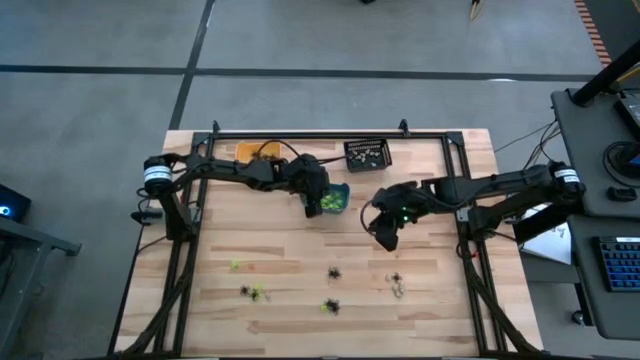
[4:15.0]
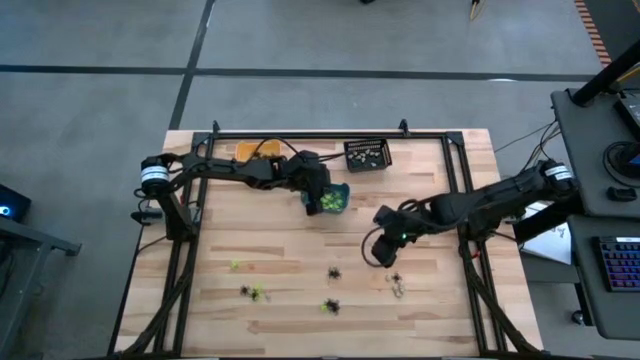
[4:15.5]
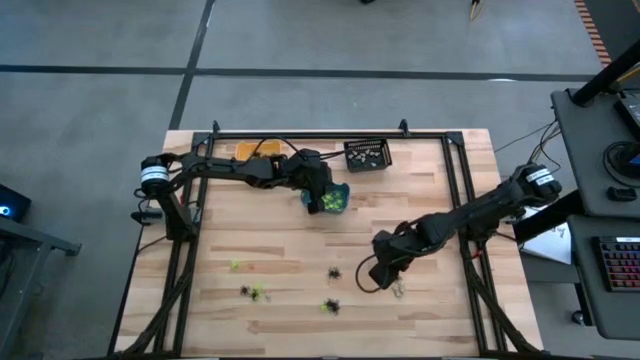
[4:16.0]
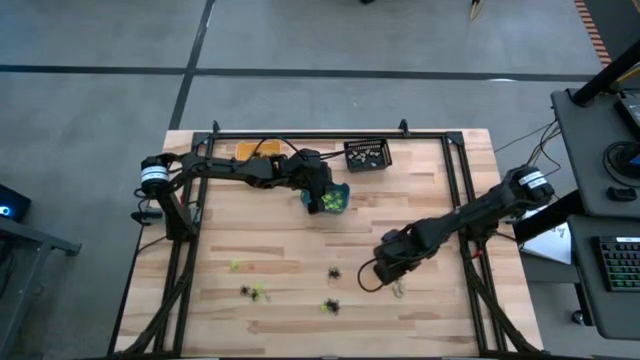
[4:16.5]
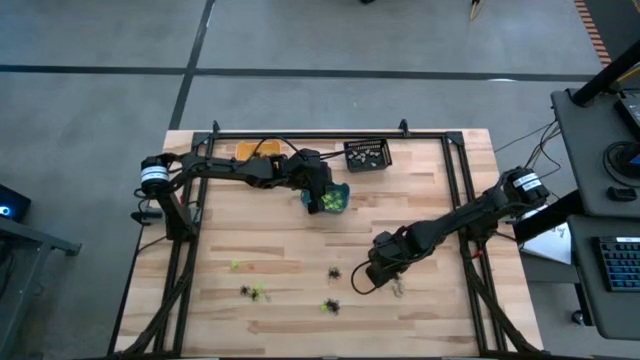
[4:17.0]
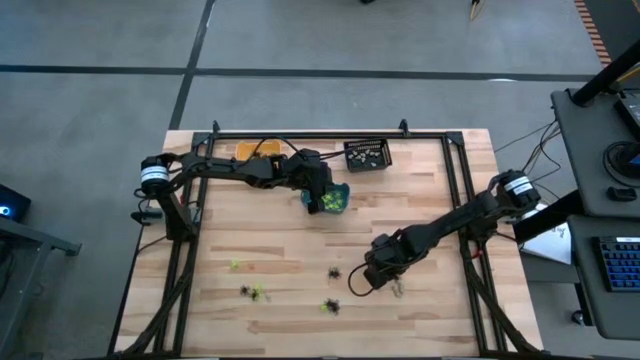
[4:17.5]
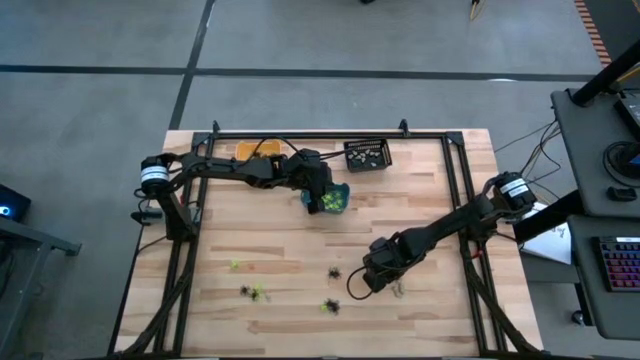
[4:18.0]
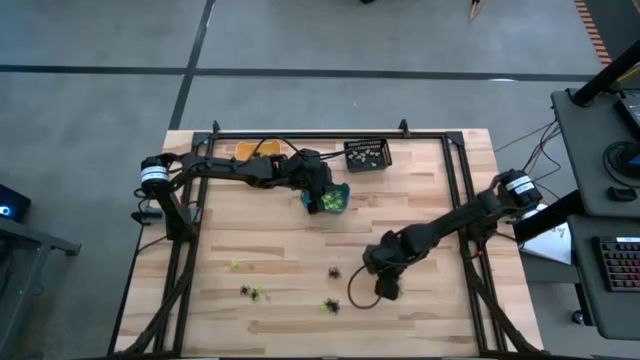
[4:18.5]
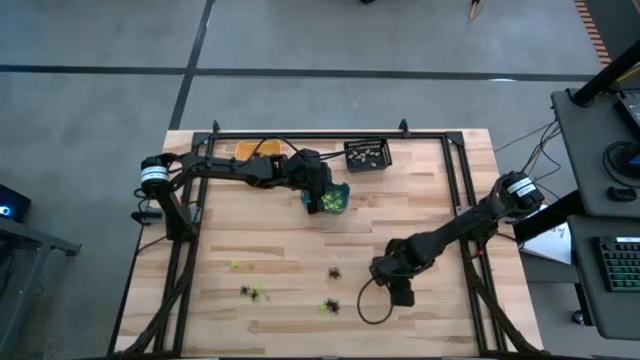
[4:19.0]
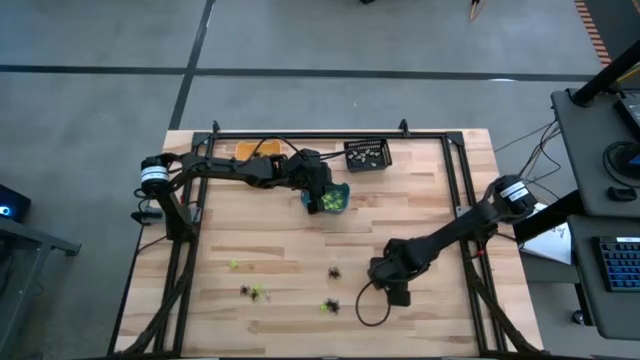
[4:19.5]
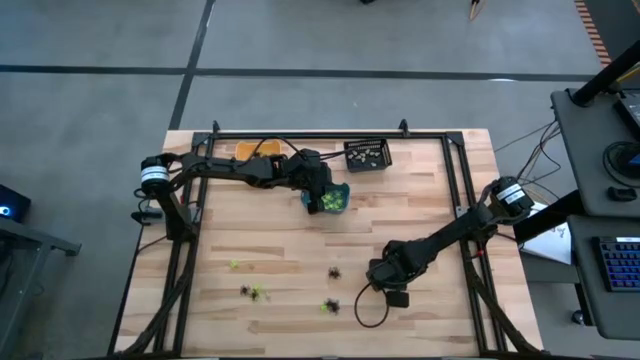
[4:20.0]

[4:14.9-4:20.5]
Task: Sort Halloween decoration
Put the white skull toy into the black bin

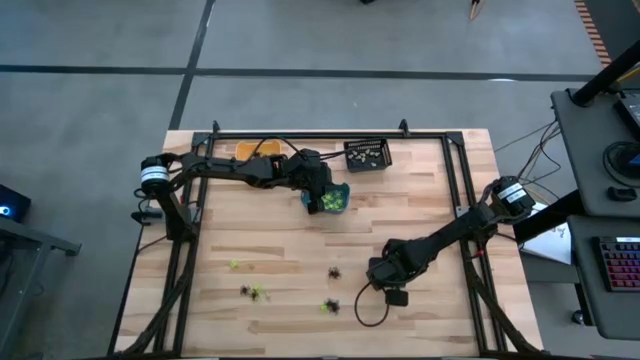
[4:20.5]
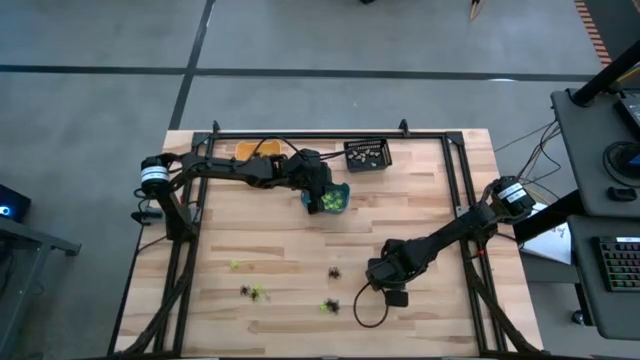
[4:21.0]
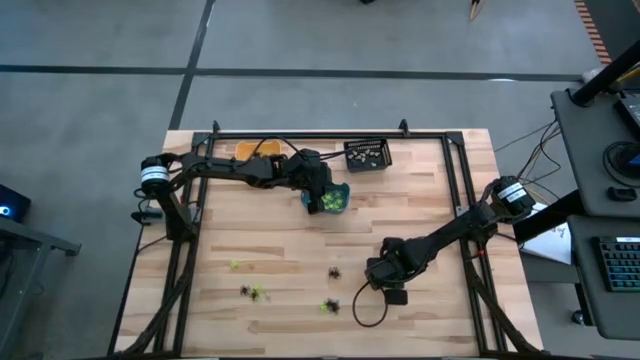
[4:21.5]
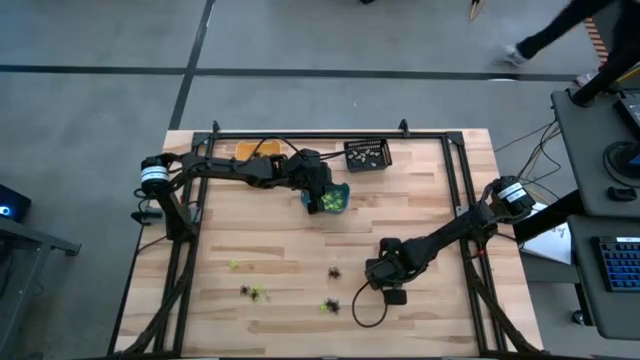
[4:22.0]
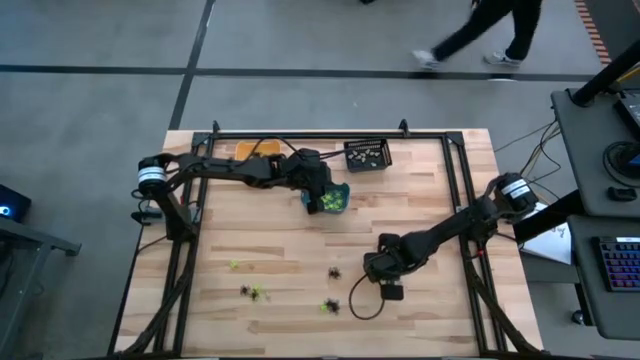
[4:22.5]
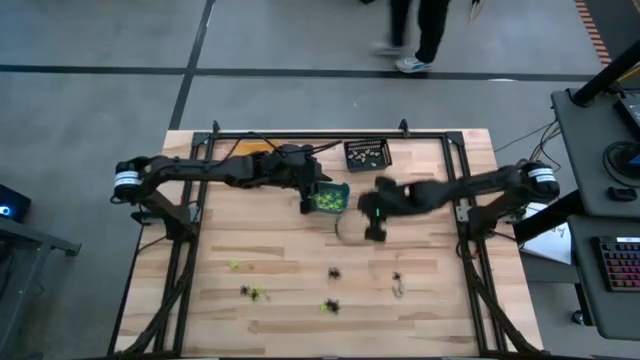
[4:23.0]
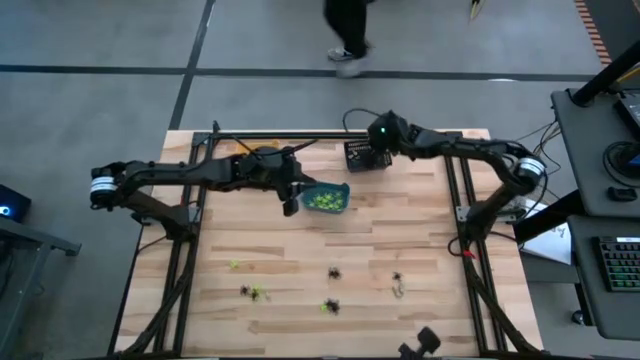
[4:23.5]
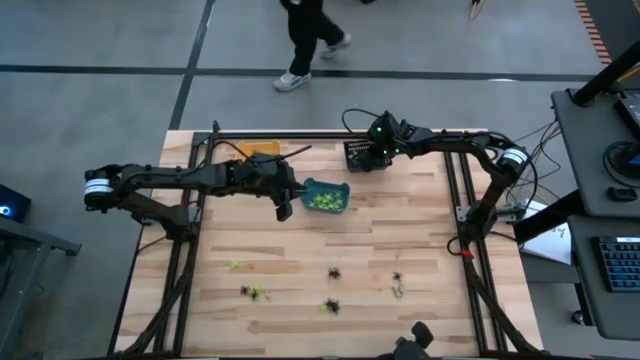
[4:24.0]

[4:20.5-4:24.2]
Put the white skull toy into the black bin

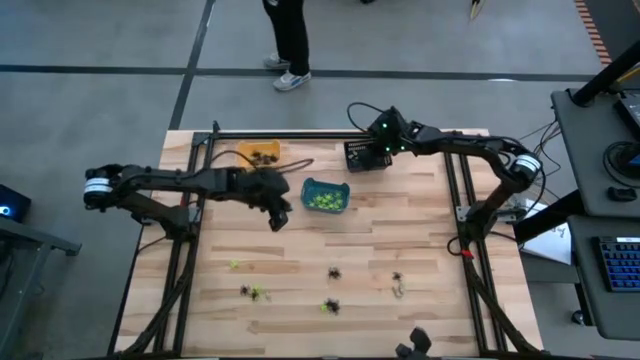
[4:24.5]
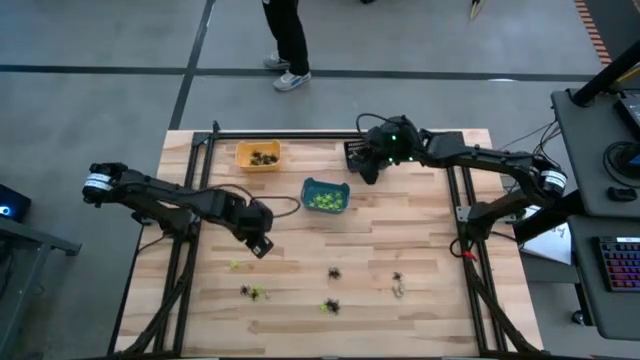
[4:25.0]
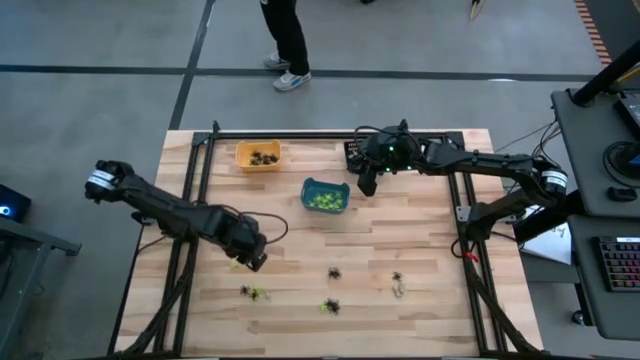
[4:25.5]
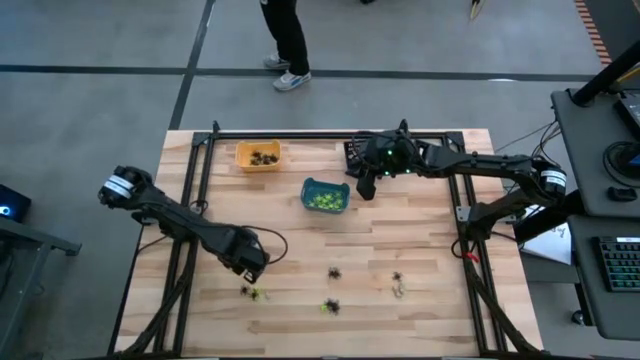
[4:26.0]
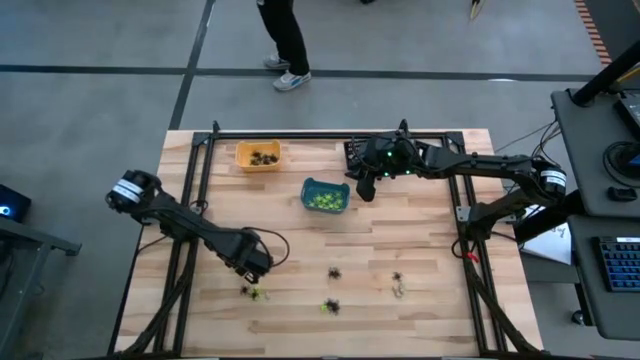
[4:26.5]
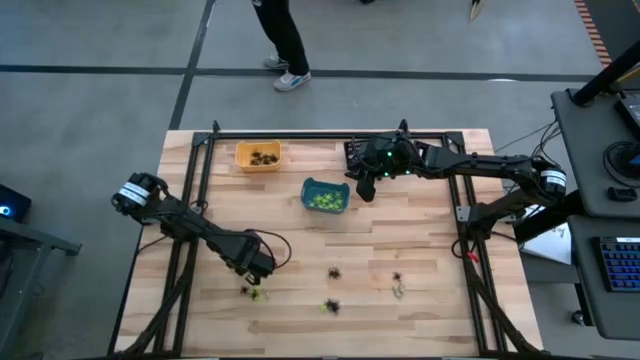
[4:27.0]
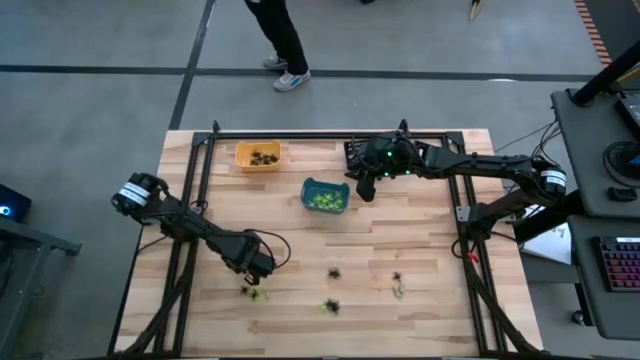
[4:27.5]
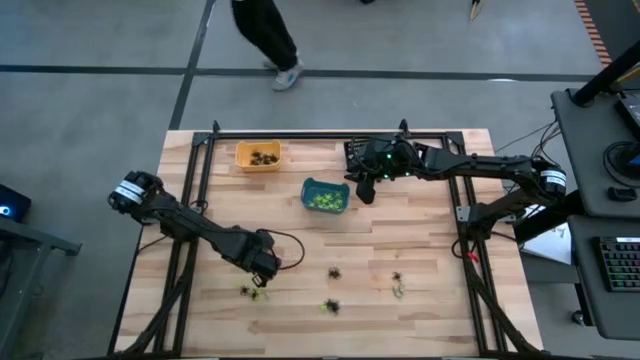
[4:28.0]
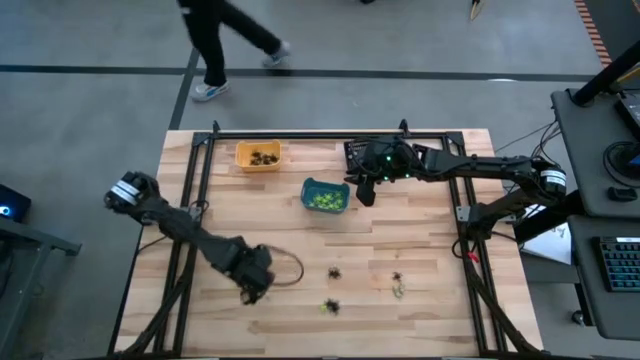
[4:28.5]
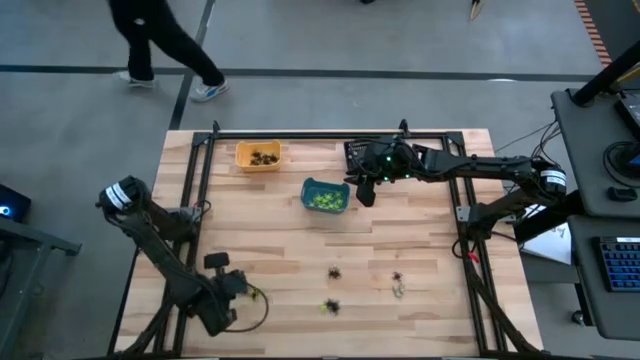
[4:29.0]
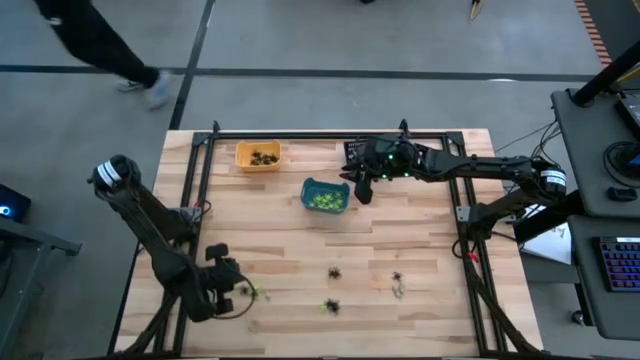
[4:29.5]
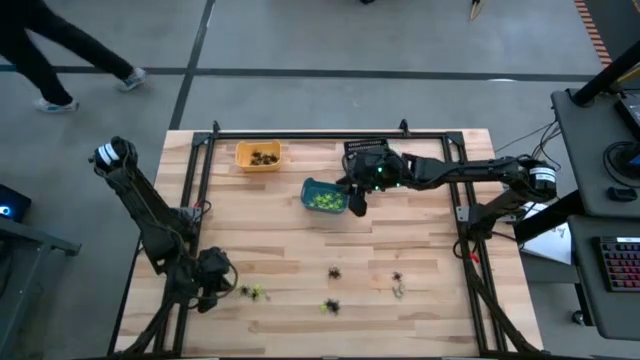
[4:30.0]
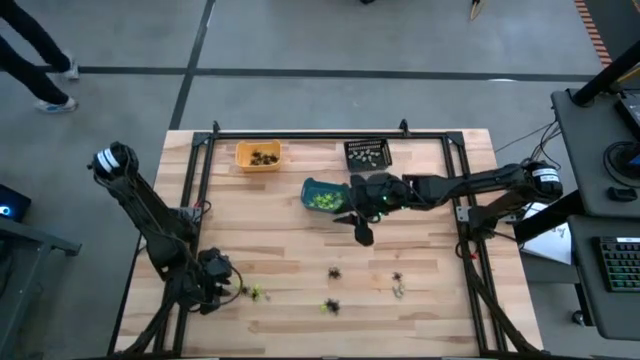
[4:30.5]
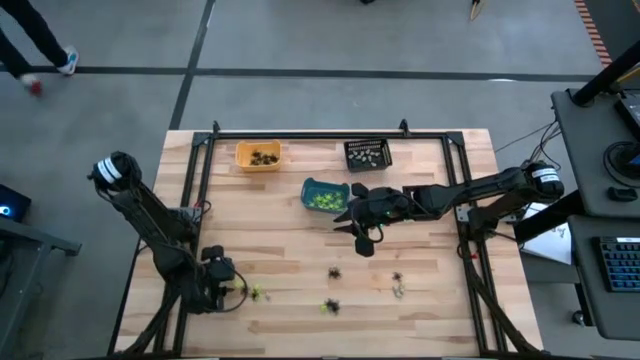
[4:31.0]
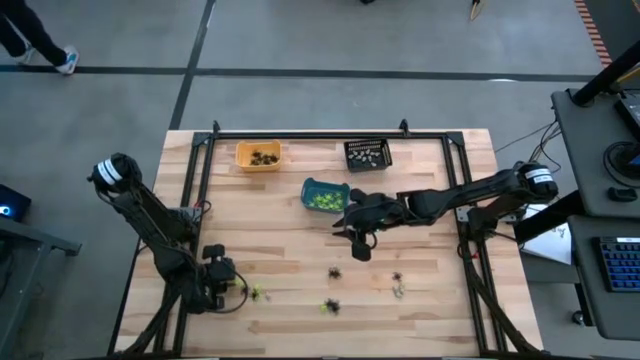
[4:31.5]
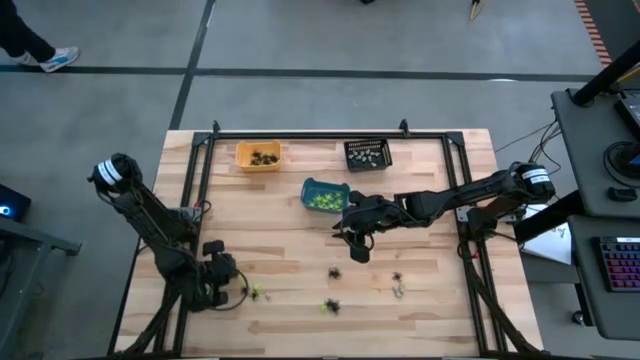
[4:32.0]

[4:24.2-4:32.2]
Put the green spider toy into the blue bin

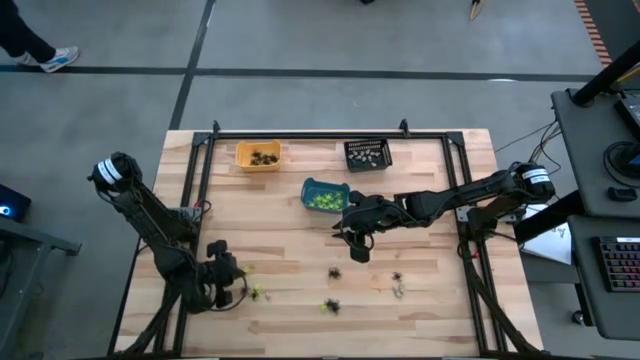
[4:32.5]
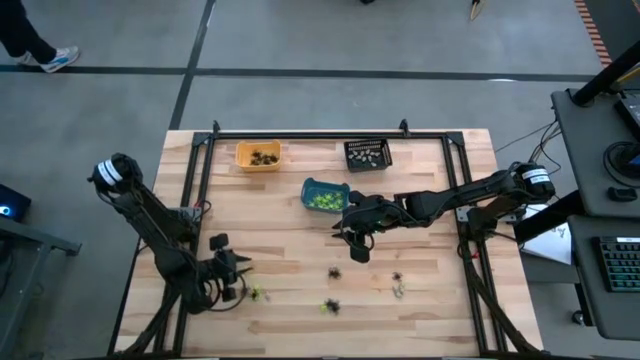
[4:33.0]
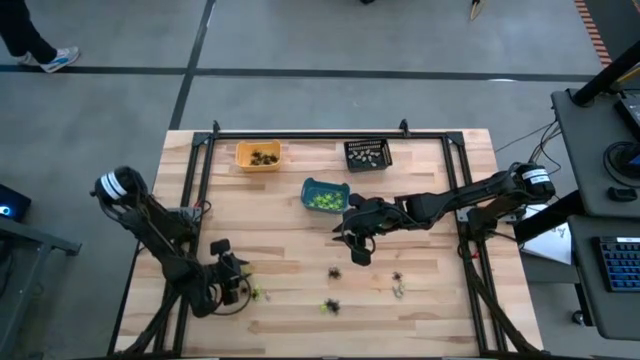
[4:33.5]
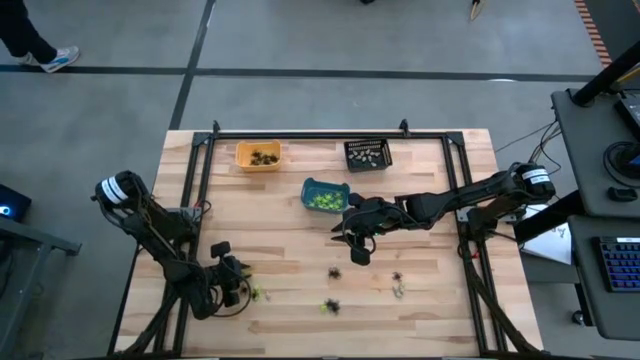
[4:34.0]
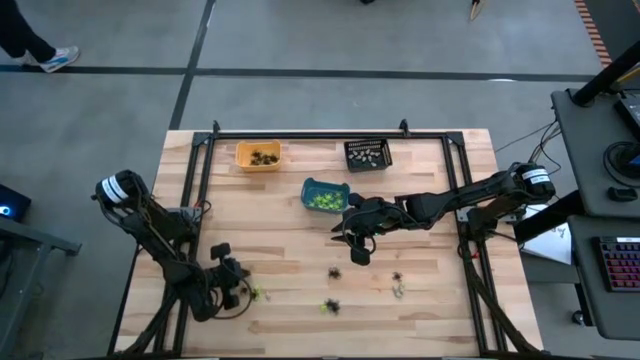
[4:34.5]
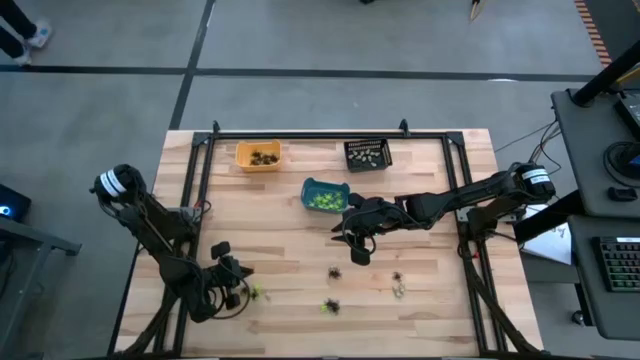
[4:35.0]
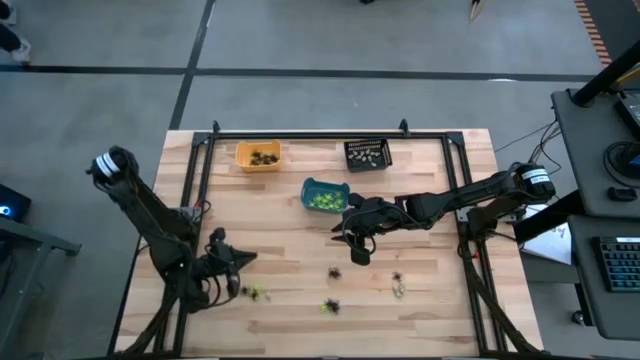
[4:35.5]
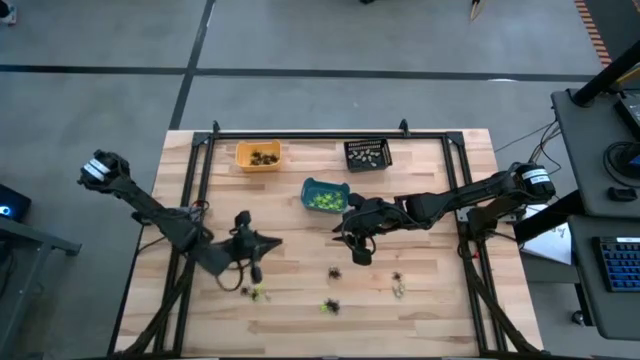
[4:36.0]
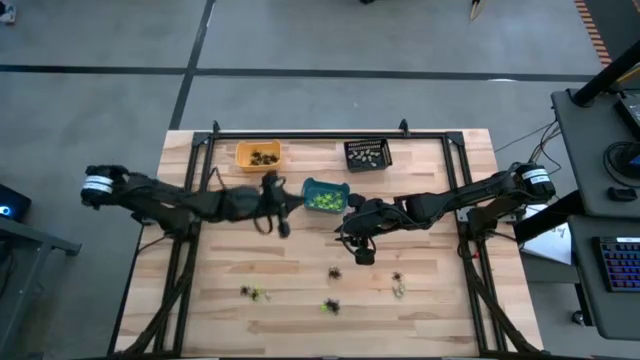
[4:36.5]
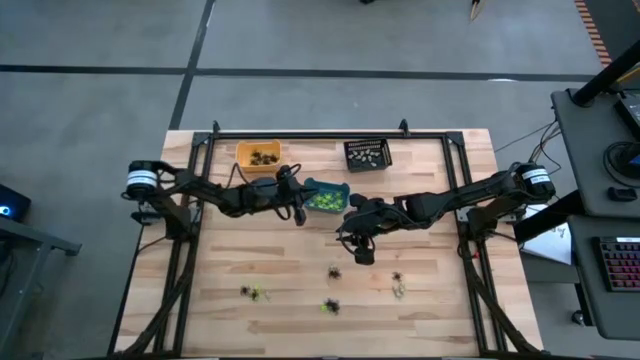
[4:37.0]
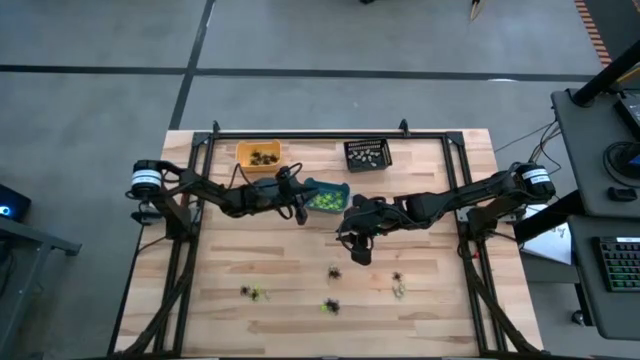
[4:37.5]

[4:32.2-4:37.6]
Put the green spider toy into the blue bin
